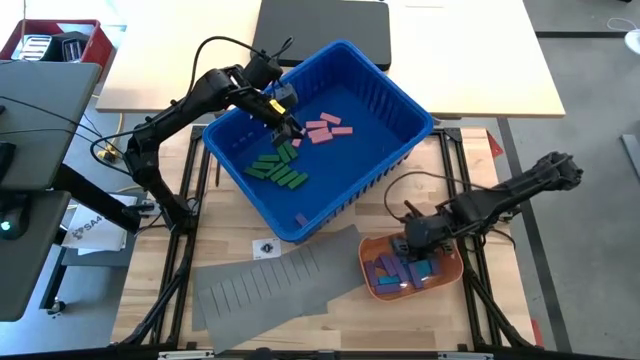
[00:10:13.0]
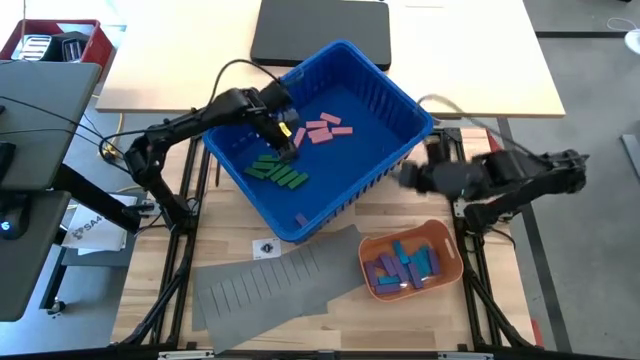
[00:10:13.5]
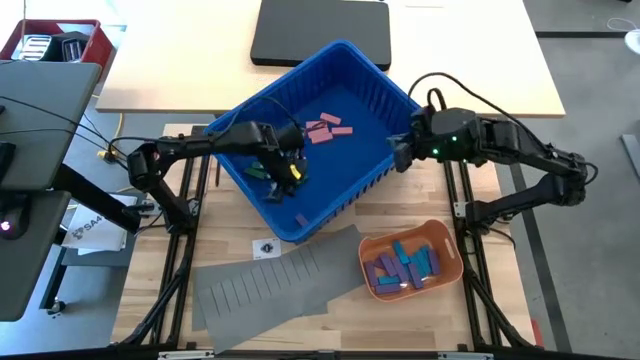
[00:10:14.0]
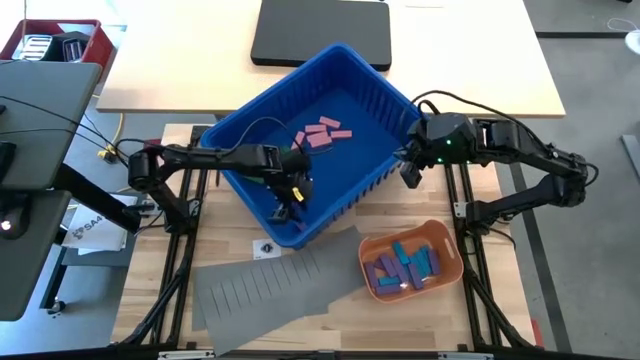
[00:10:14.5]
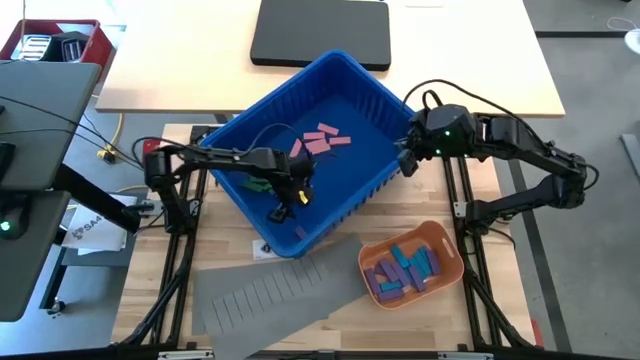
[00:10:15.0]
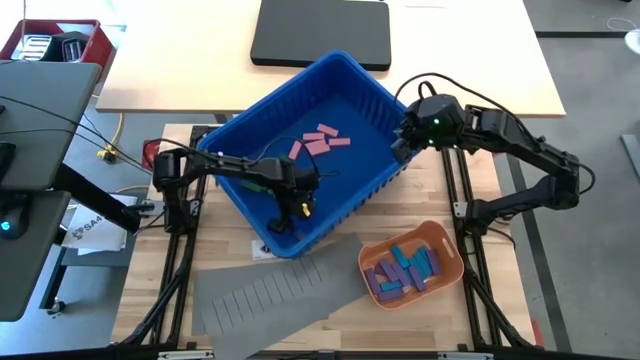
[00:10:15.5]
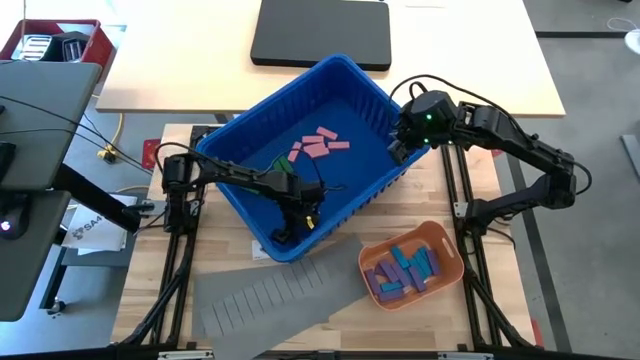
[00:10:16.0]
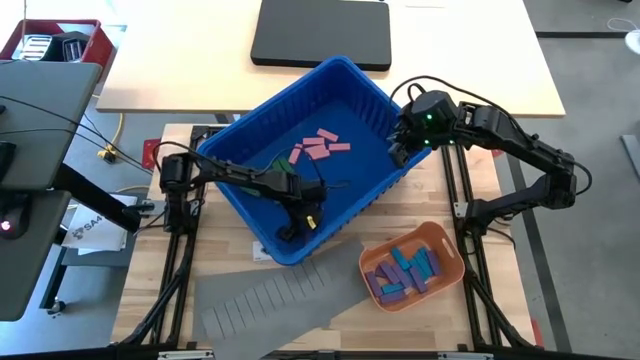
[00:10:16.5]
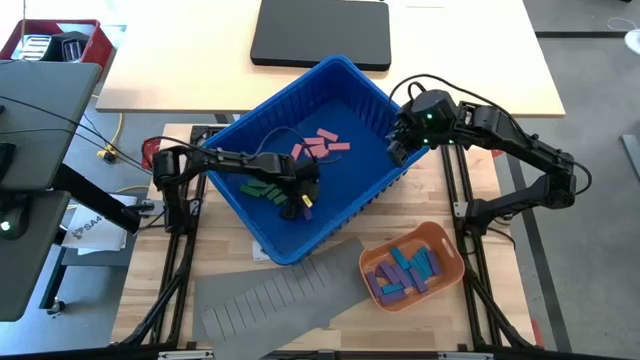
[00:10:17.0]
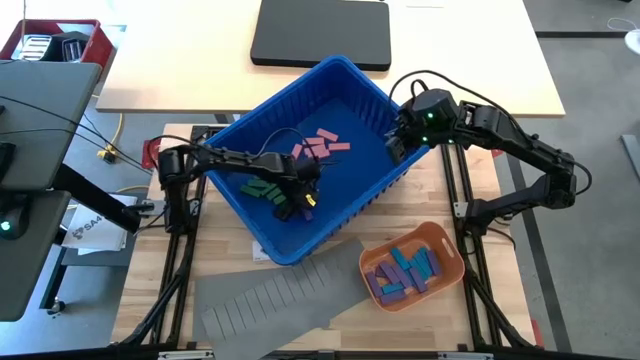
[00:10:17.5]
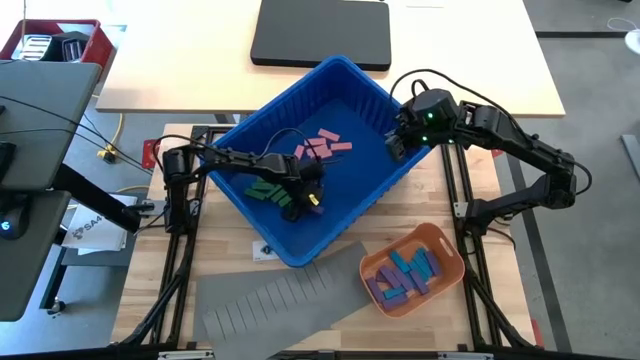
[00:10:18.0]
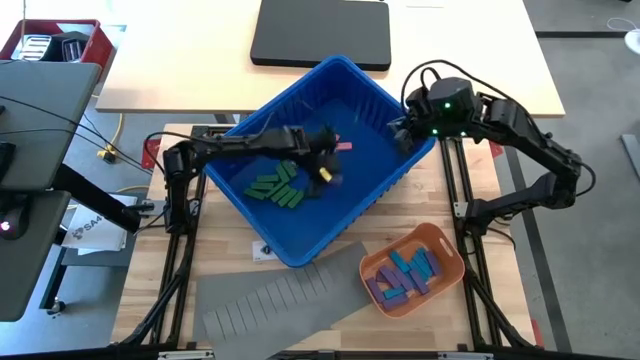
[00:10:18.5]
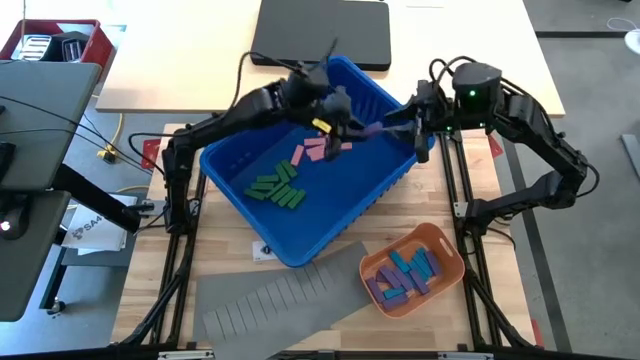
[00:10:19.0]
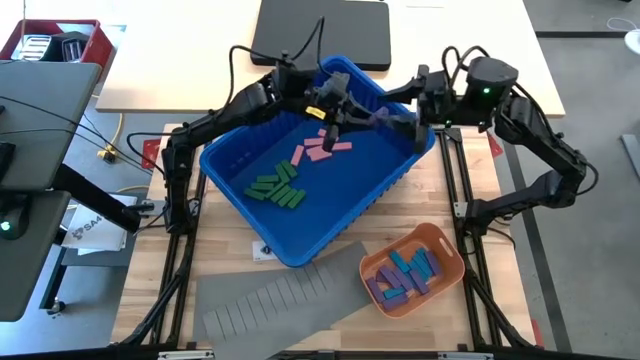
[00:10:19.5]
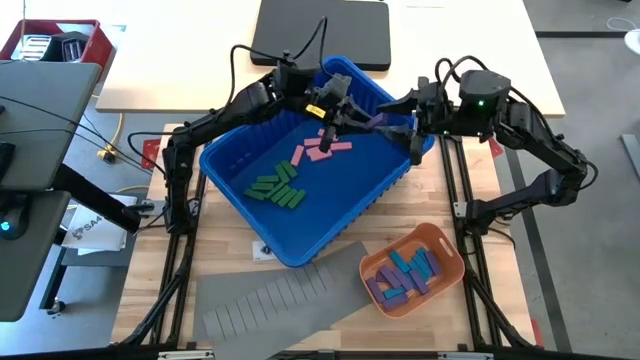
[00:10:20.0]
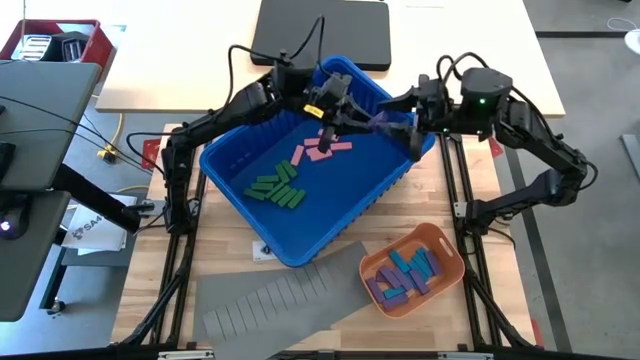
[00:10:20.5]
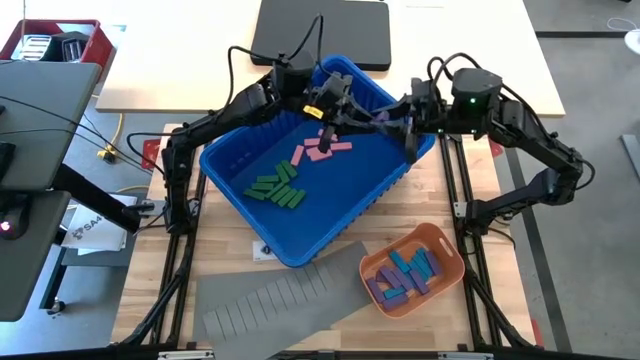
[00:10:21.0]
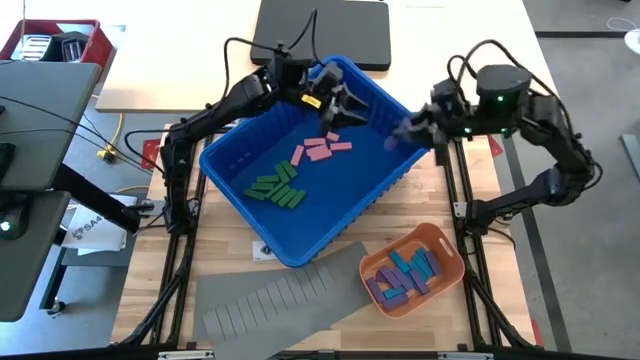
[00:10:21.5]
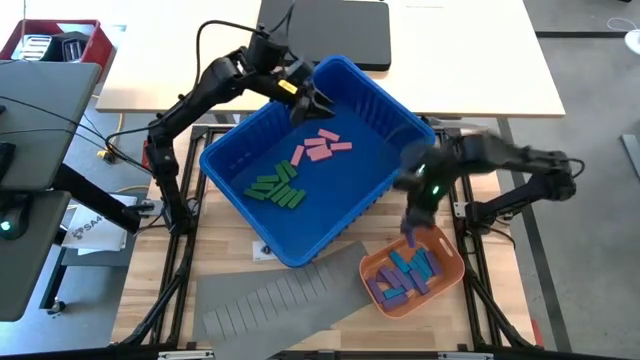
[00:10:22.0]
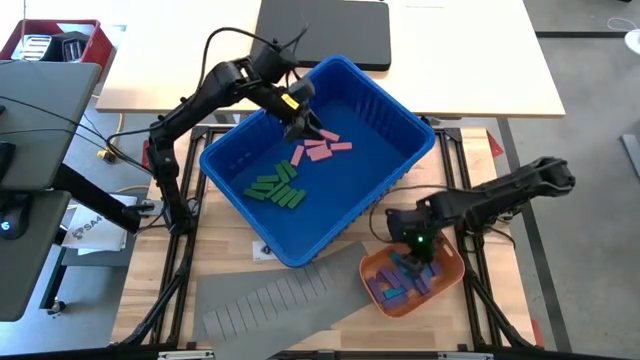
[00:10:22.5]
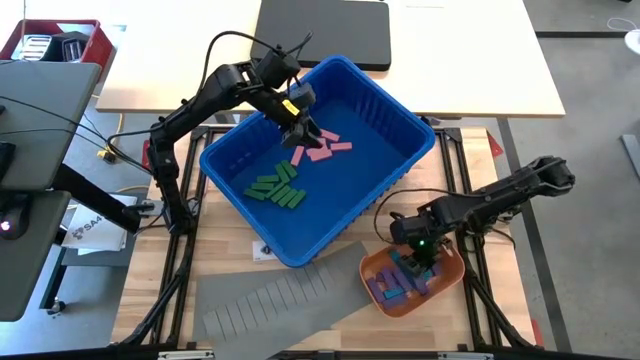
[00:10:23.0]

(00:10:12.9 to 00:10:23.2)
Task: Sort blocks
Put the purple block into the orange bin

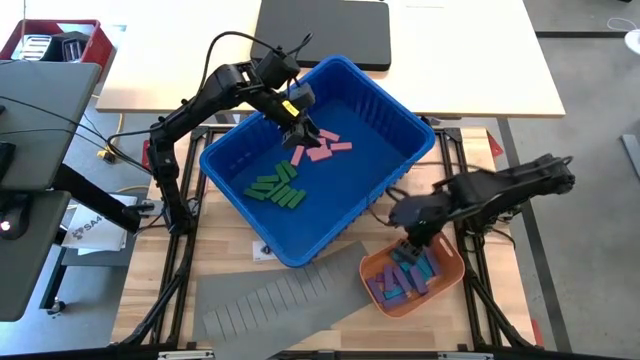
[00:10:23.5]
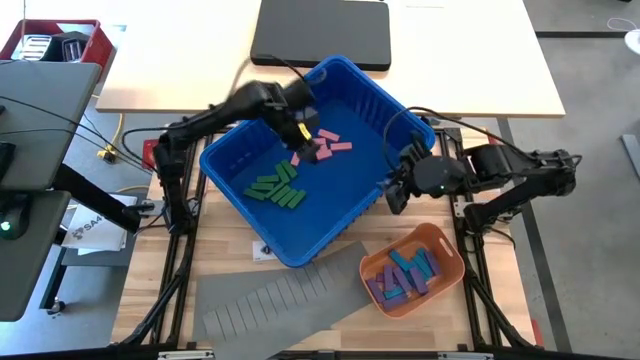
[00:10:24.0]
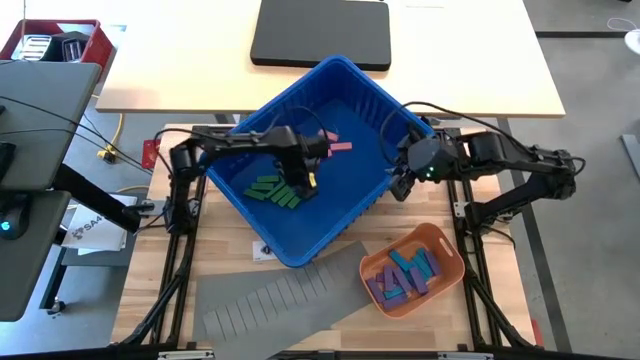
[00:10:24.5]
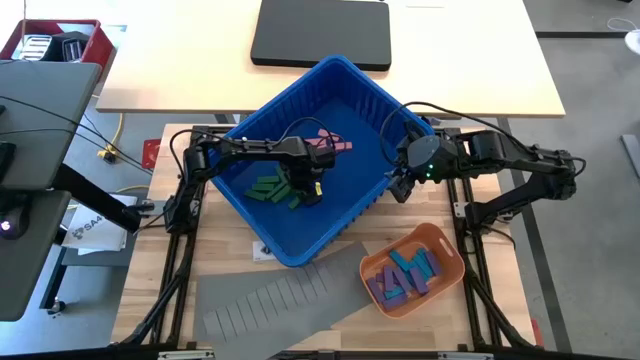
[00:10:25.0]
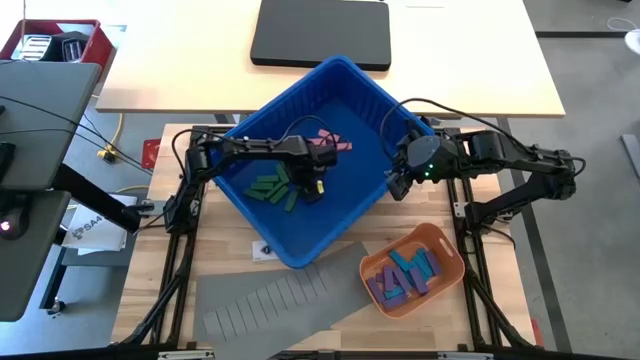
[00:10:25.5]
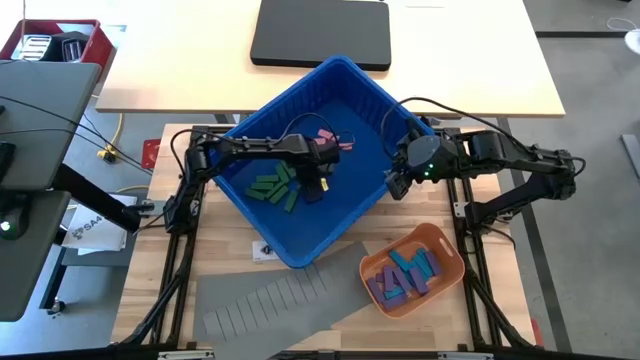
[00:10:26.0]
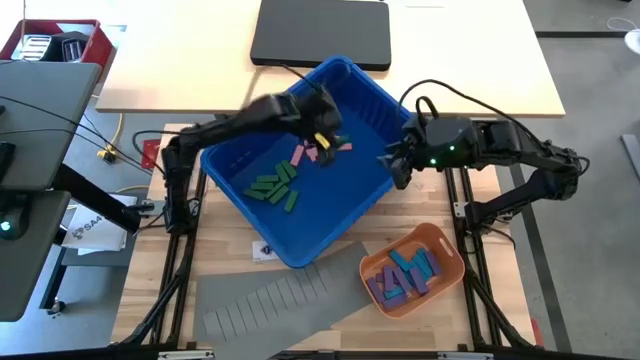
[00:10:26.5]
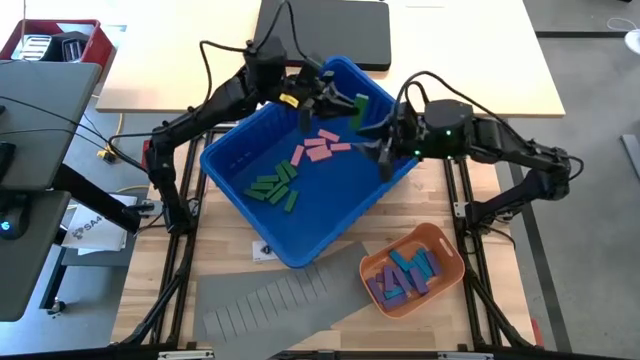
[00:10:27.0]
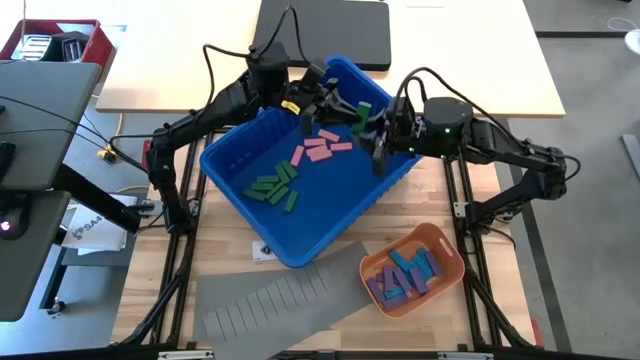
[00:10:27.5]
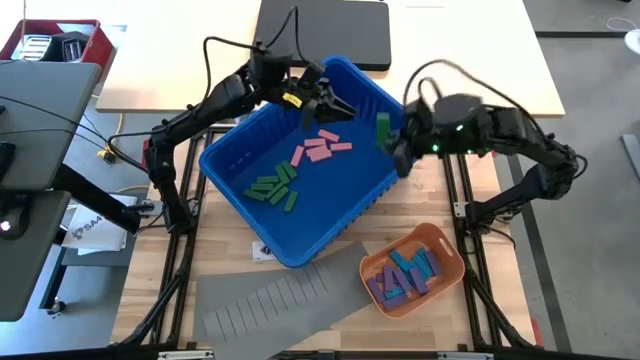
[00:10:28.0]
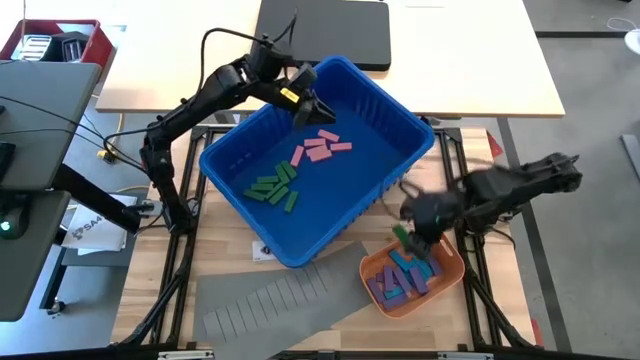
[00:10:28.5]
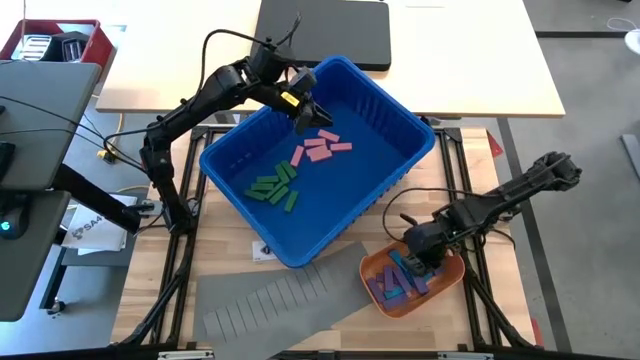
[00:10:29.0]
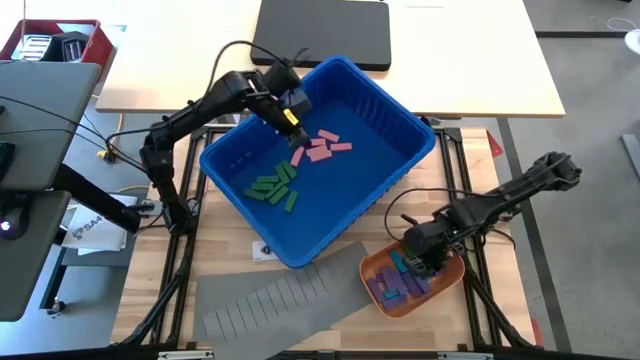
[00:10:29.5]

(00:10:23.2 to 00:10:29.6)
Put the green block into the orange bin

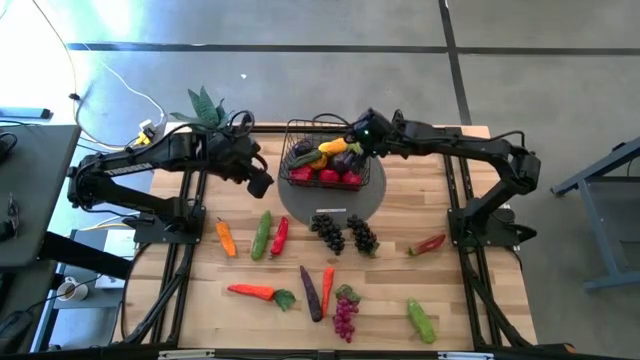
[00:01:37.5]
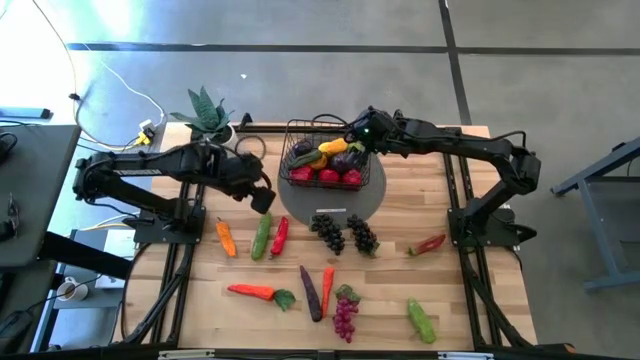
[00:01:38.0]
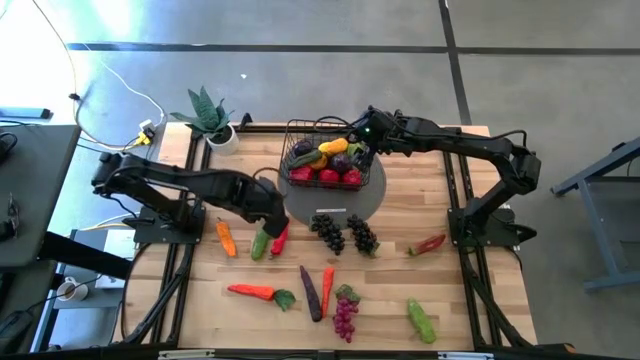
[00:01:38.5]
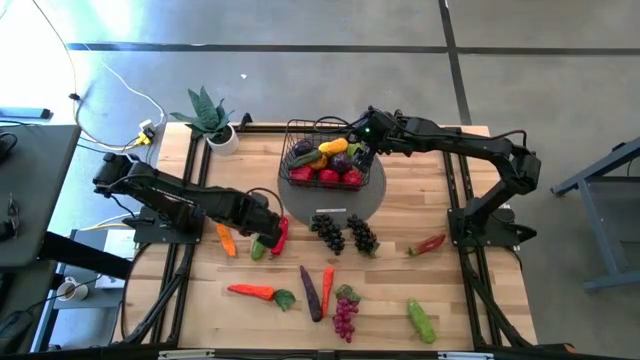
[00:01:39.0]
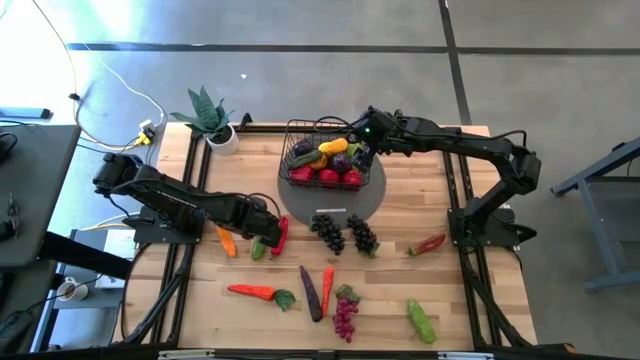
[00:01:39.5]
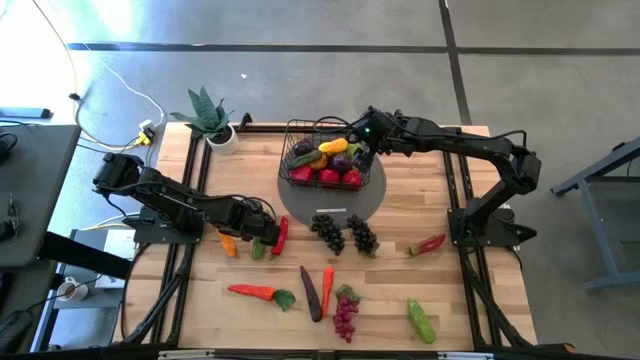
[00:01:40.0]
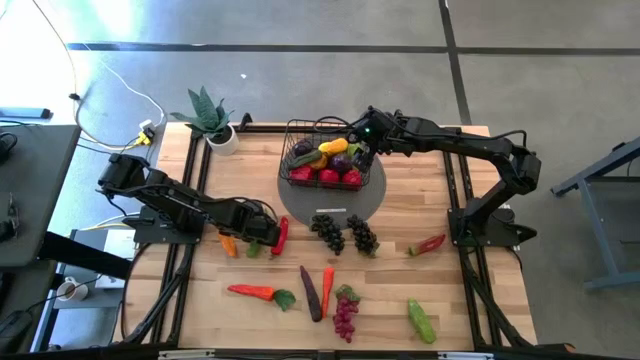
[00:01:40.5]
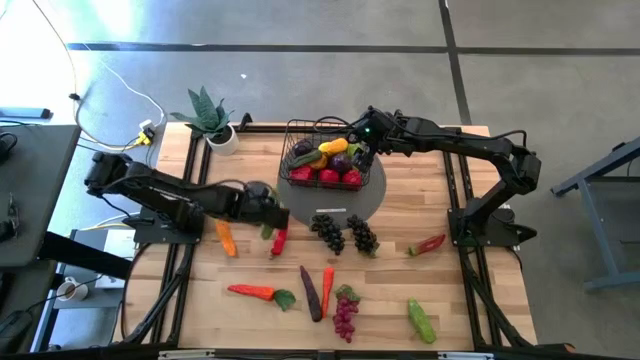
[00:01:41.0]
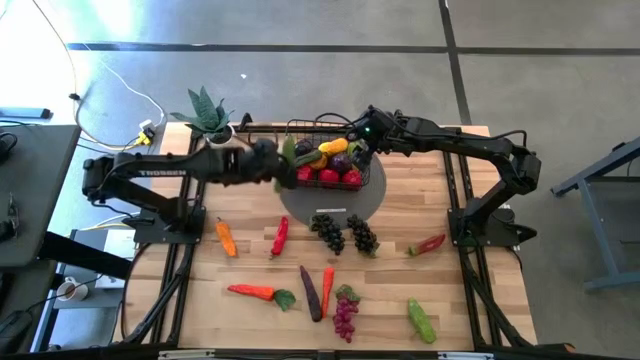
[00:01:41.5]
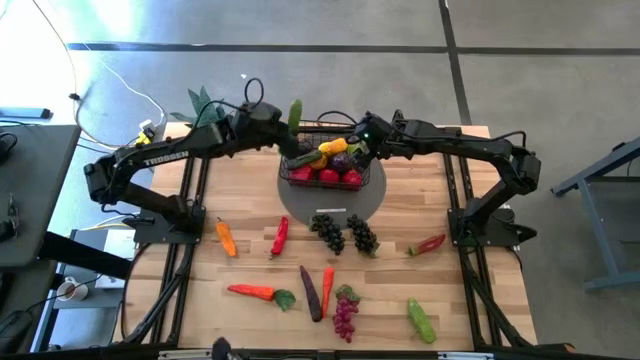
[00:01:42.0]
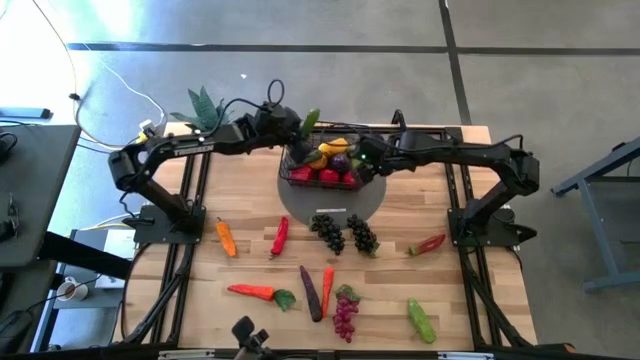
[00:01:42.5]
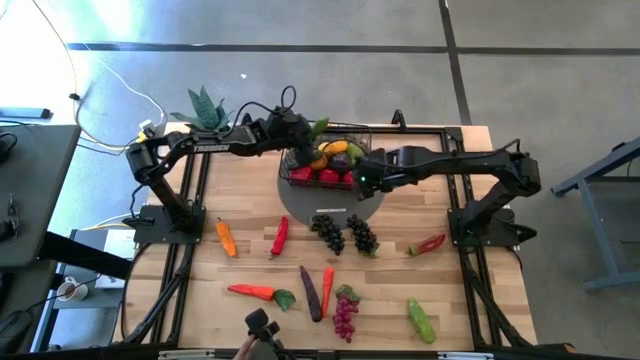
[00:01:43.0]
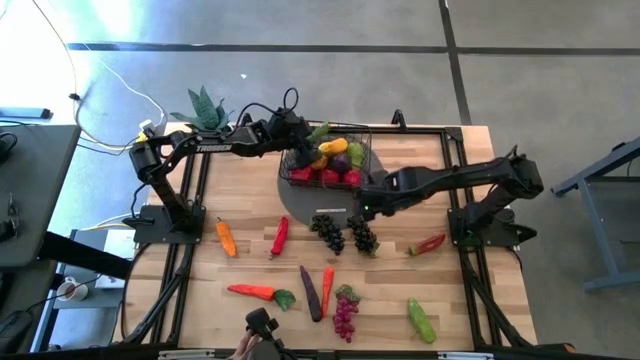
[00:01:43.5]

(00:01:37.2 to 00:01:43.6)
Task: Build produce basket
Put the green cucumber into the wire basket
